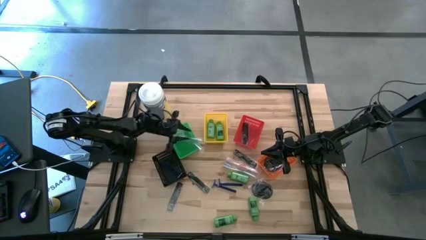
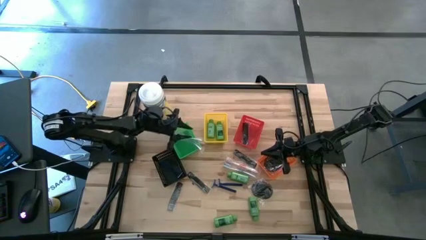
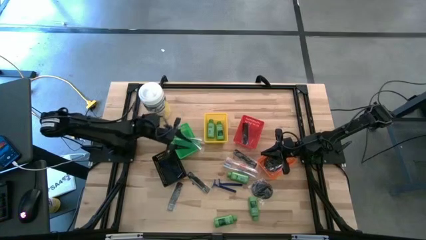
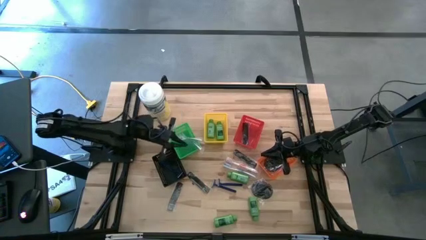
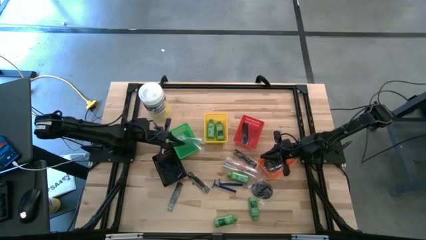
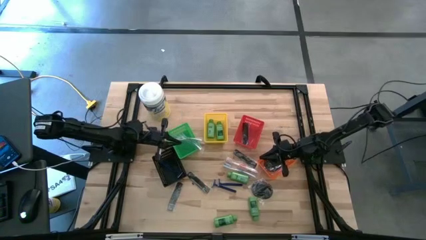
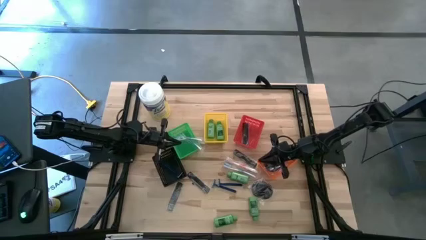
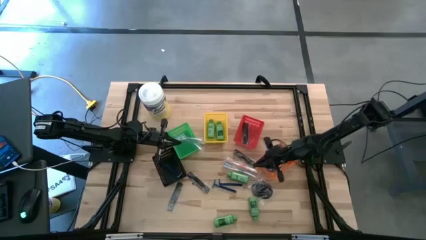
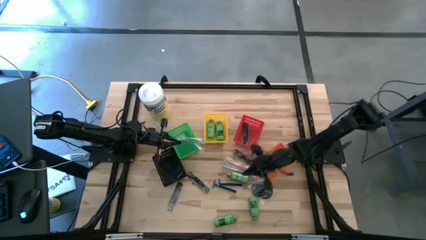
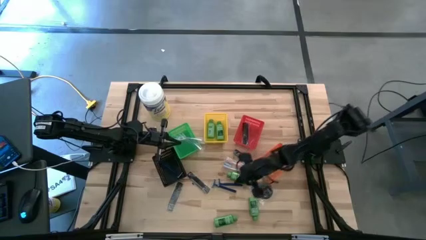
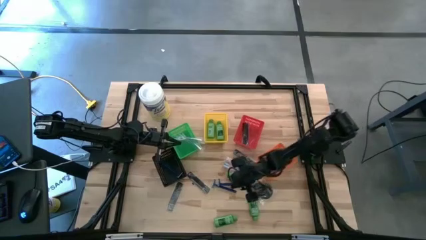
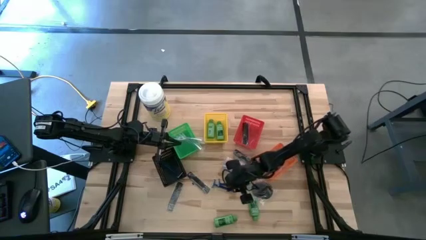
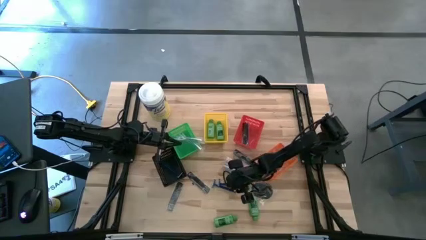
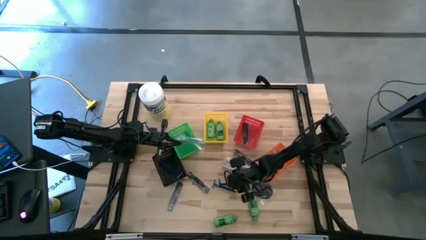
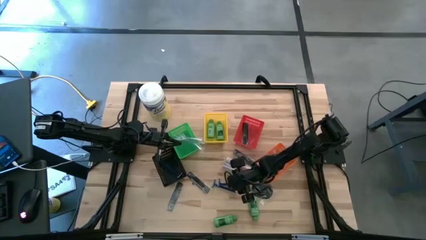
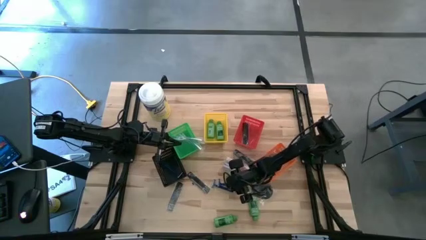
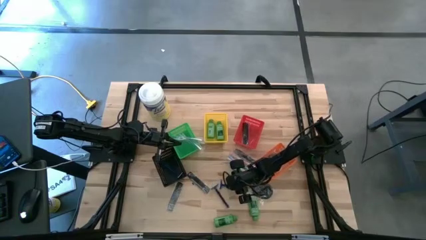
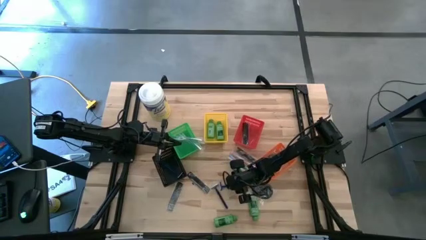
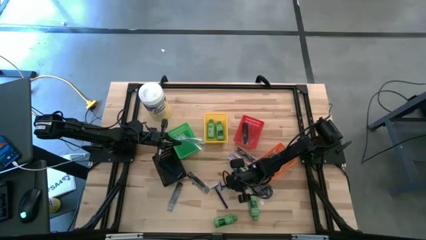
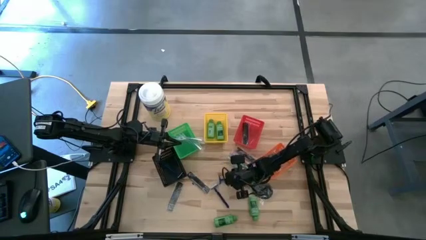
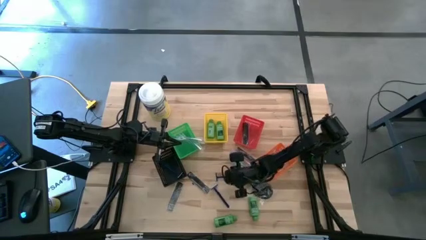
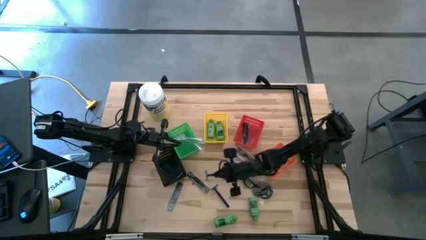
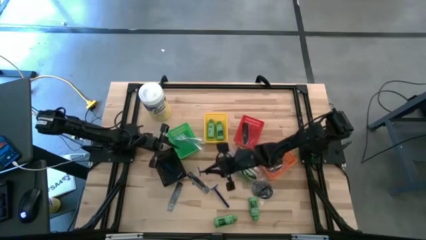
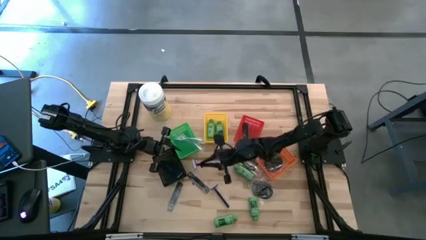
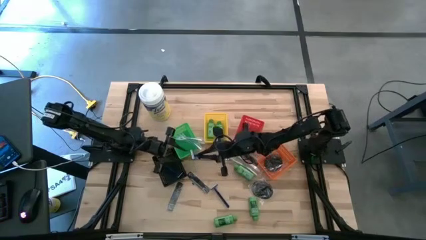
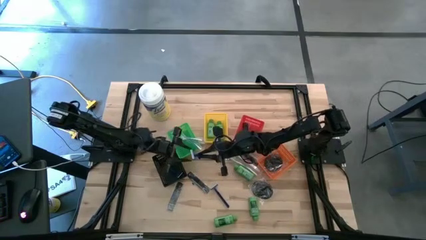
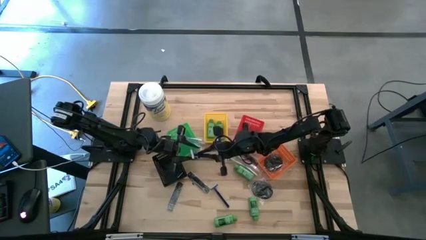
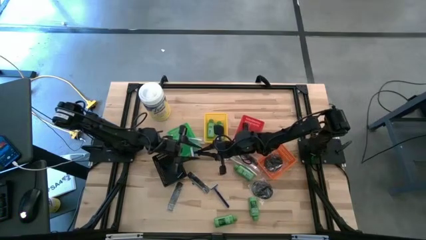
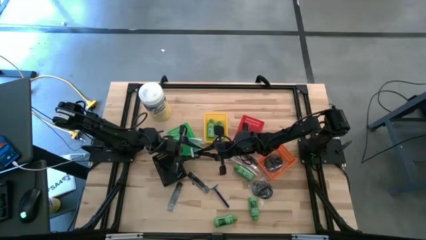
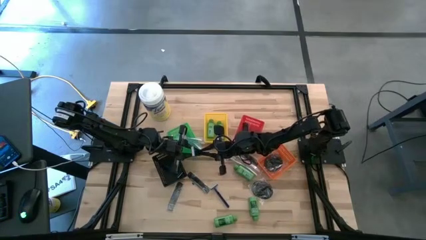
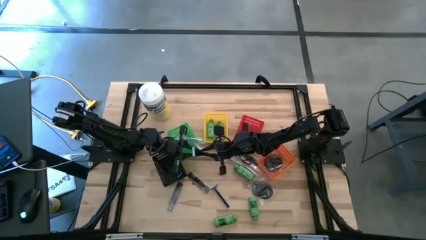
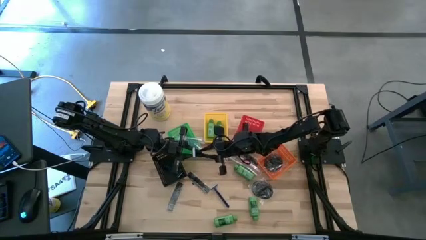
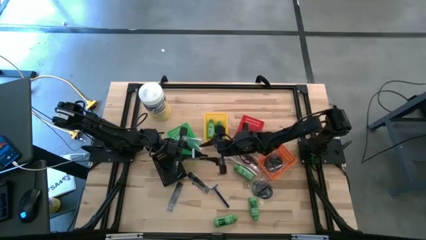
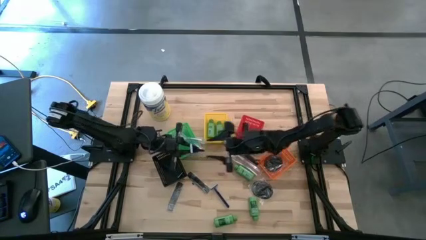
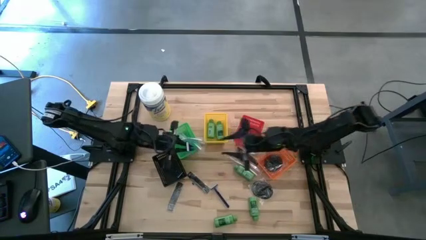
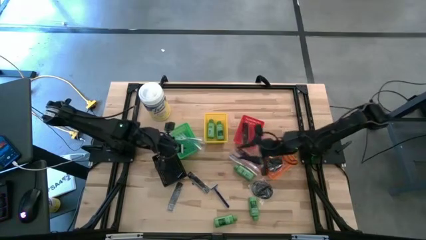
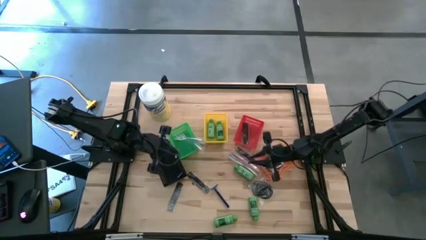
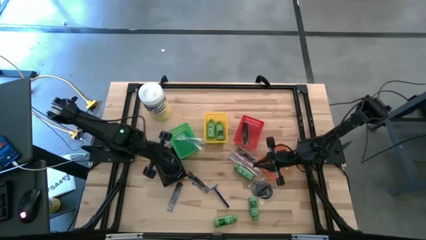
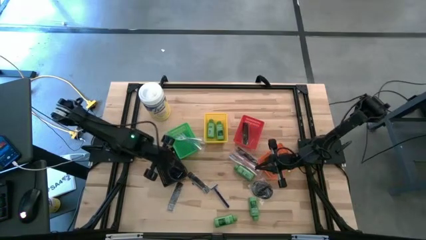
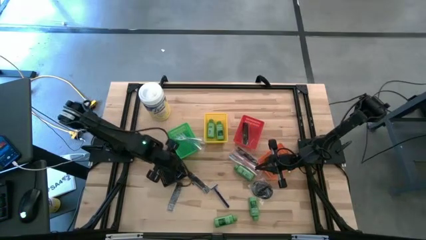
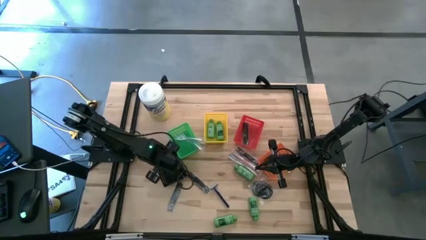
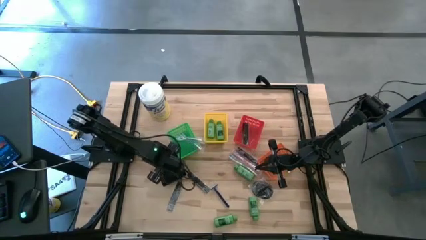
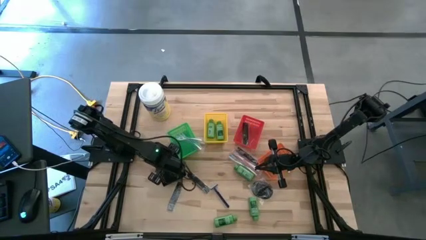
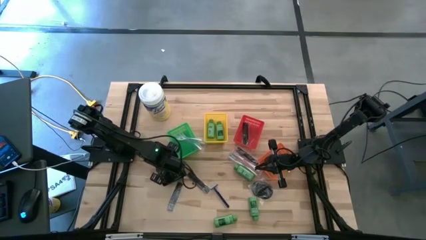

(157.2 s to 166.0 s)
Task: Pick & Place Travel size toiletries
Put the blue razor into the black bin

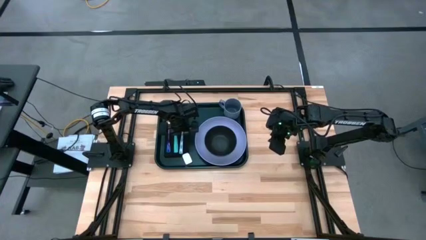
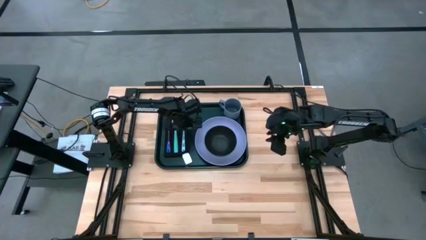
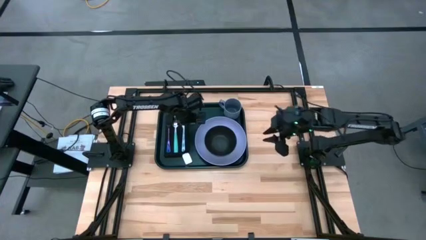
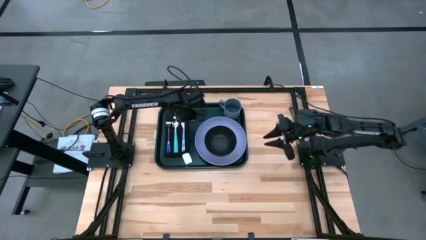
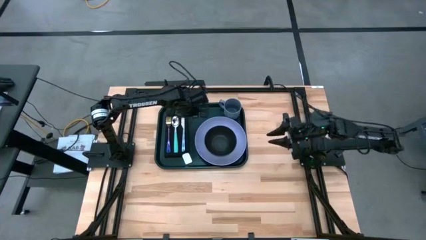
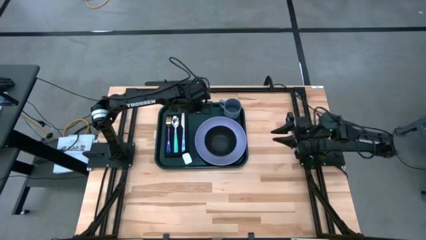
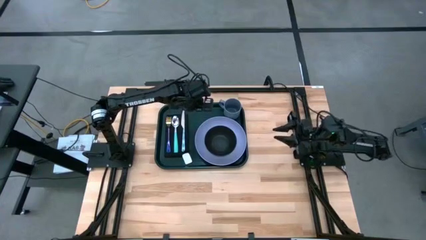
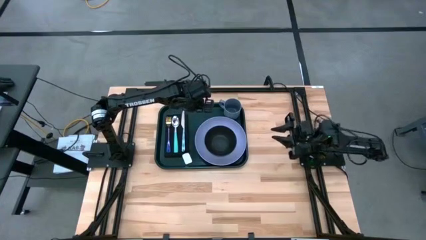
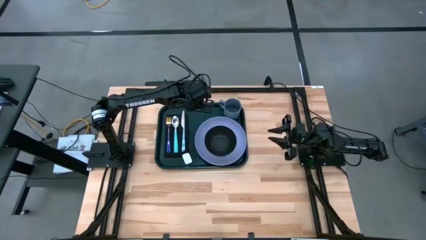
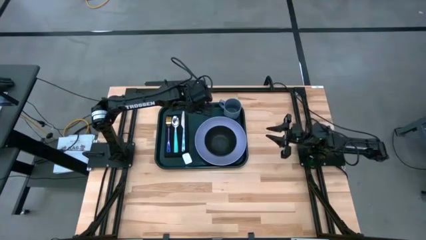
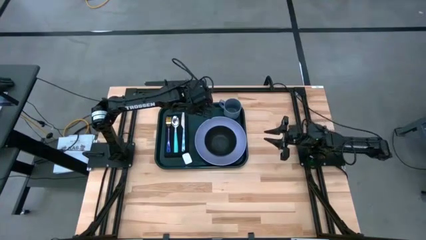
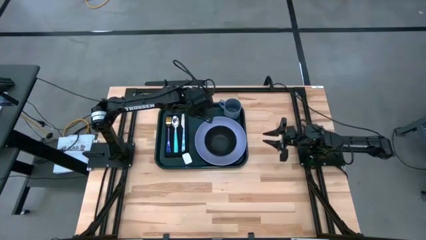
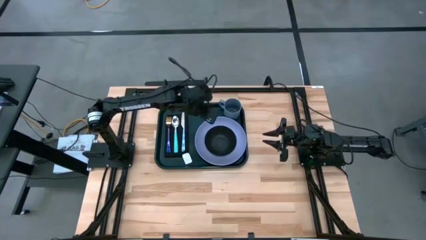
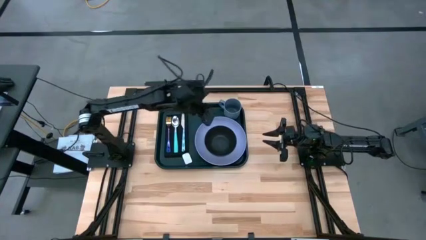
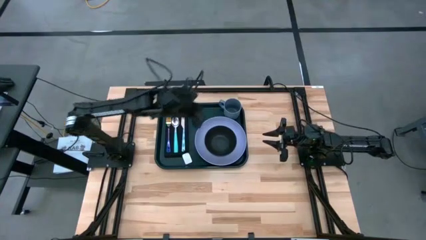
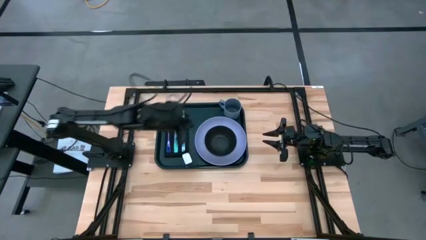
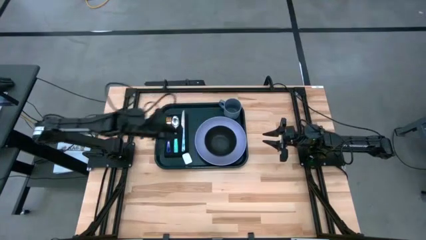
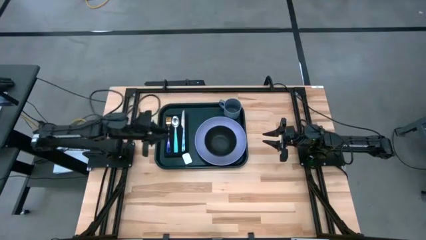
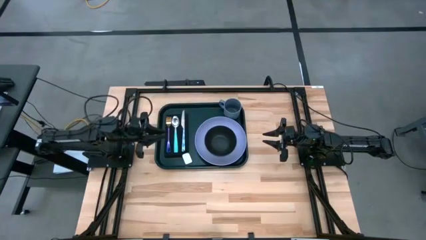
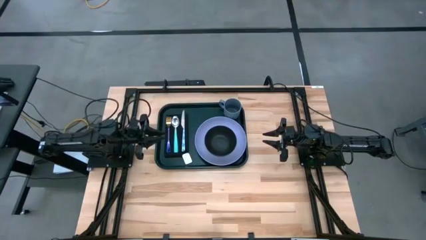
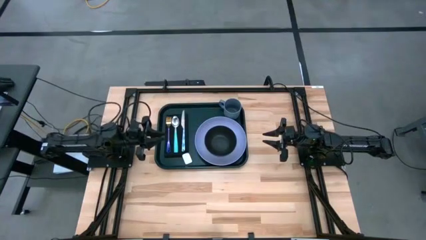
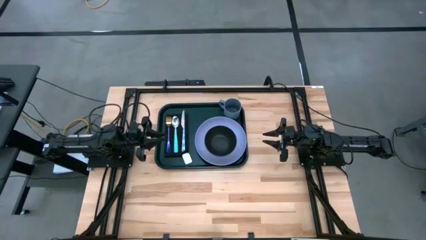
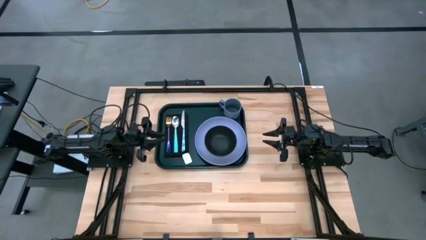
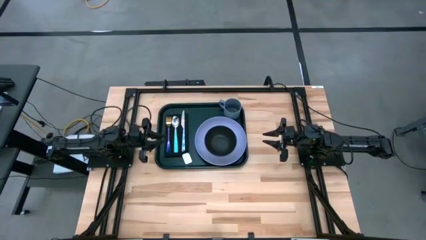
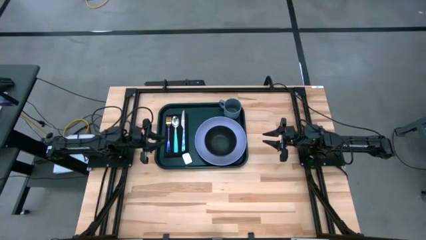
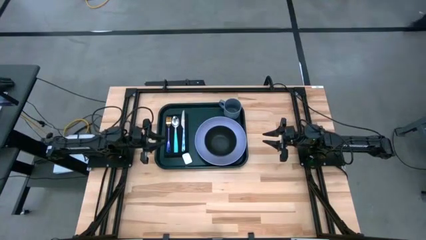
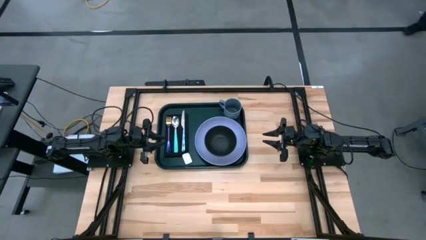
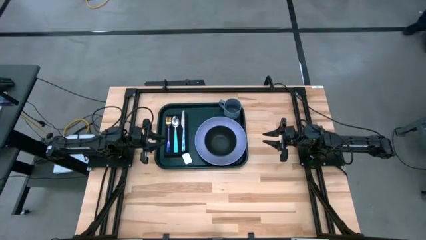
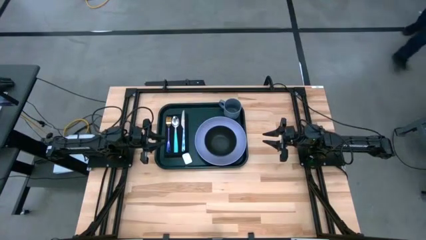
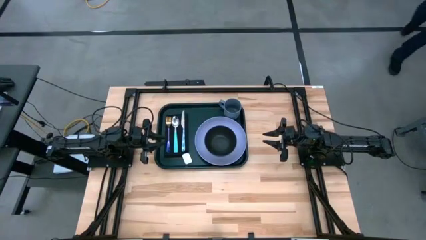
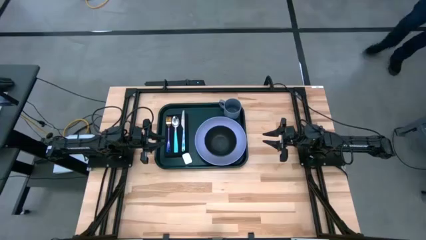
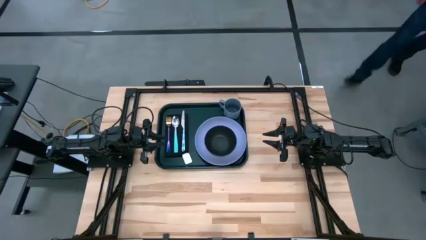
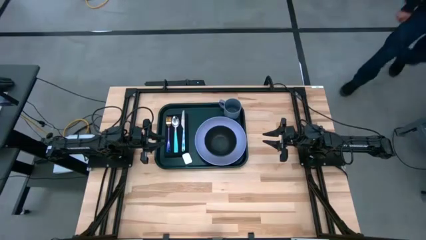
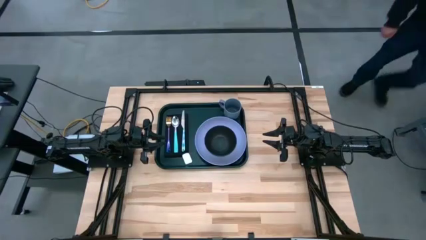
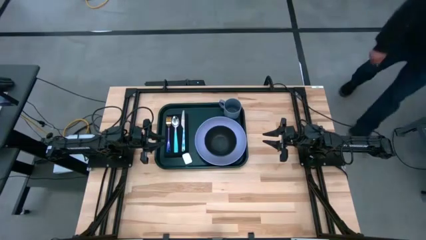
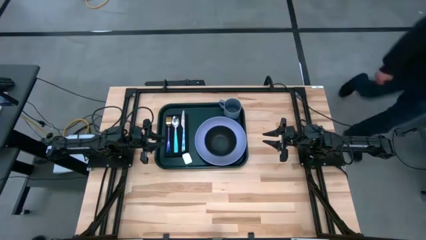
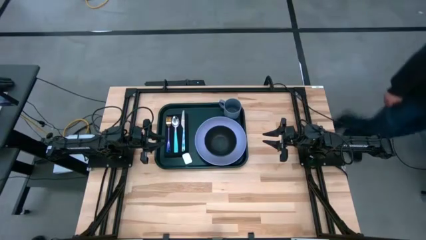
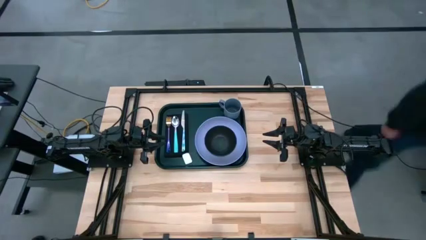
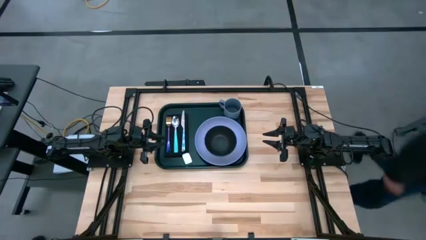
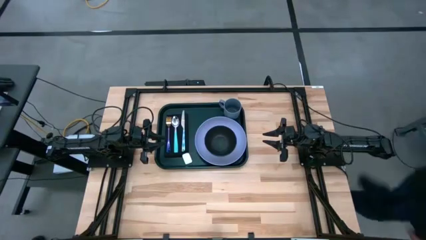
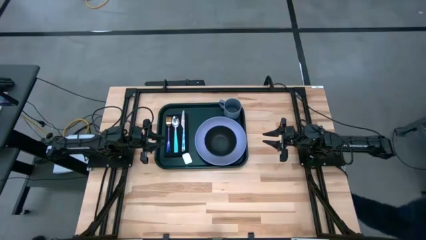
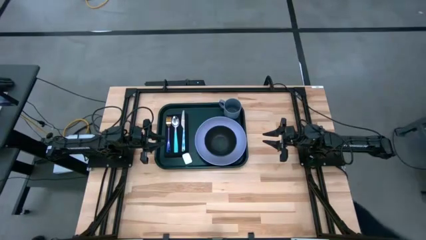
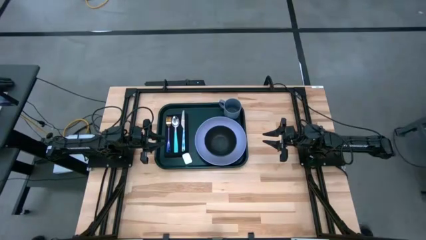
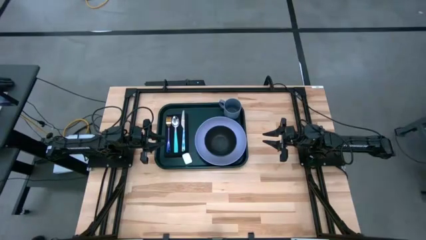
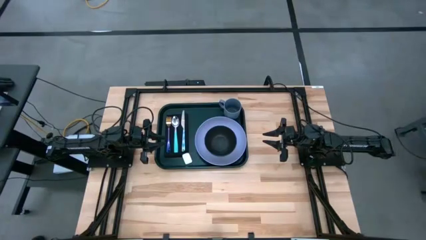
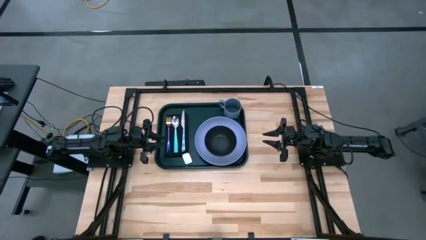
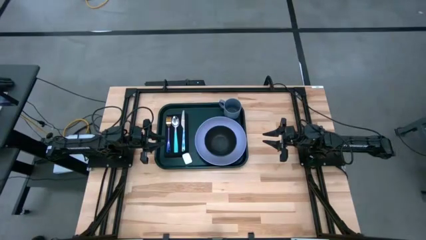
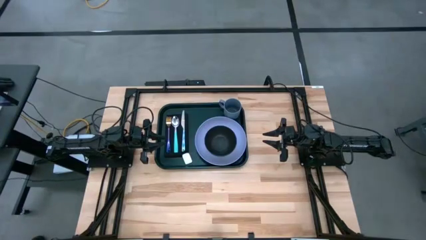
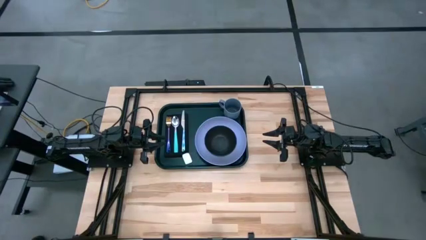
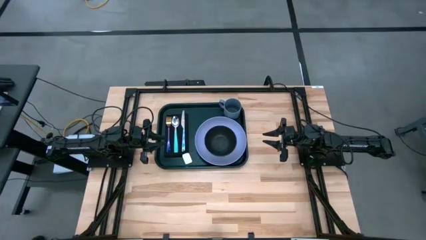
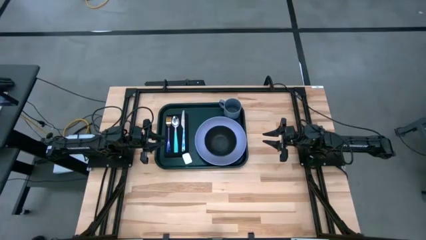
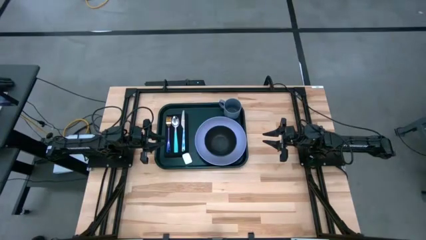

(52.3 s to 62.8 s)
Task: Set up tray
Return to Home Position
